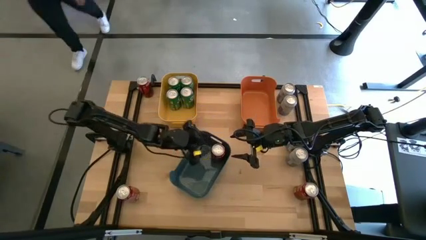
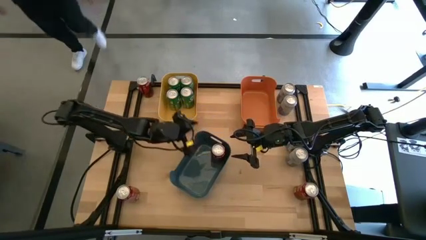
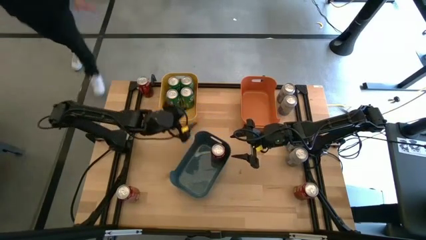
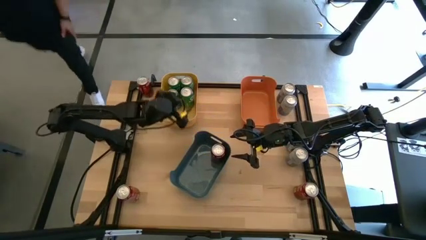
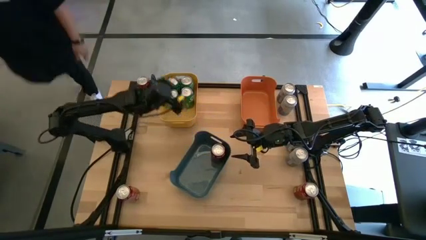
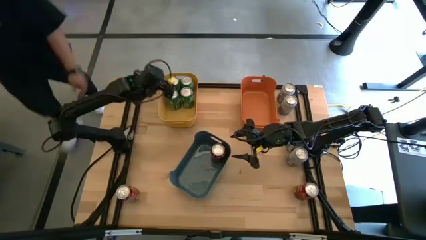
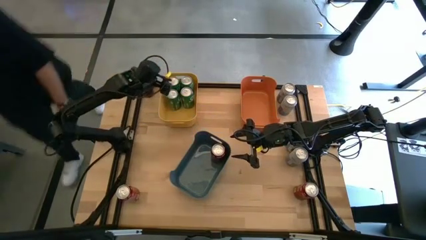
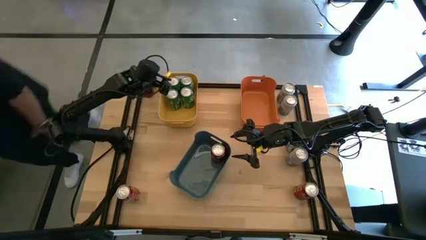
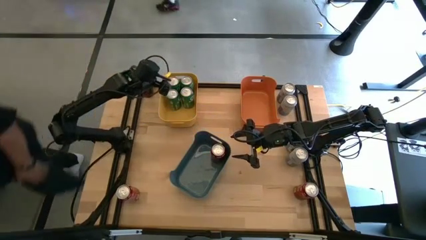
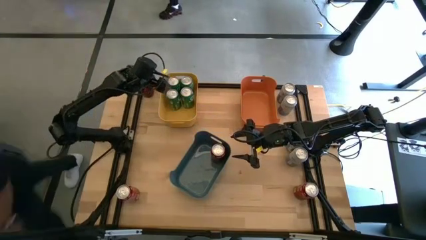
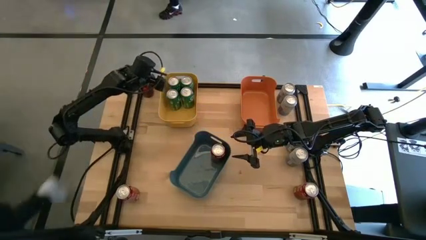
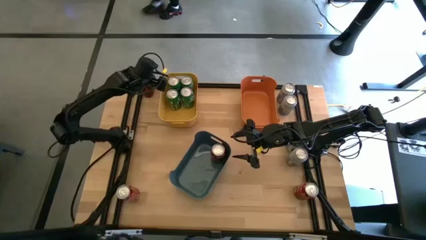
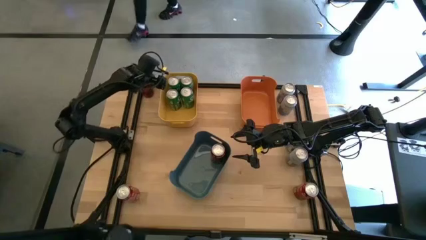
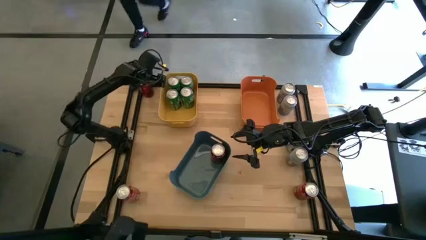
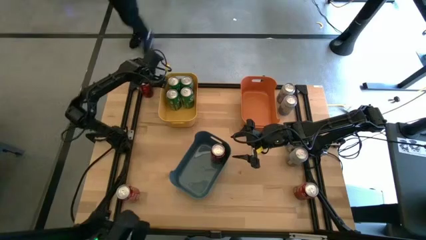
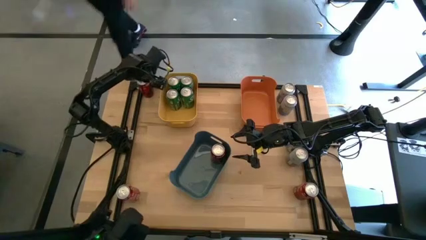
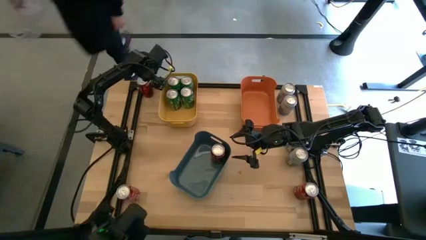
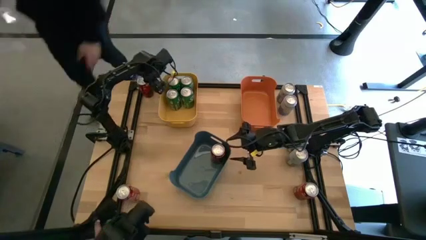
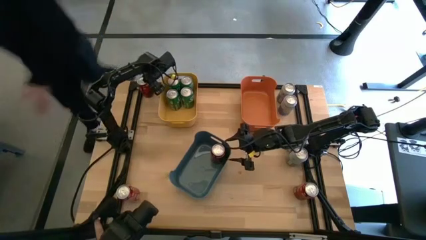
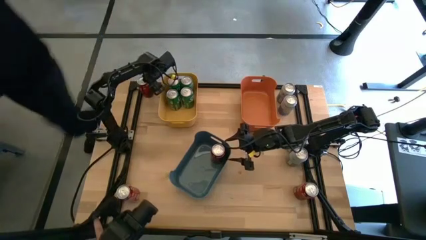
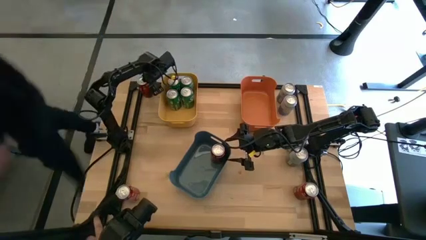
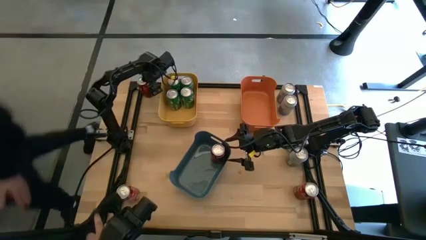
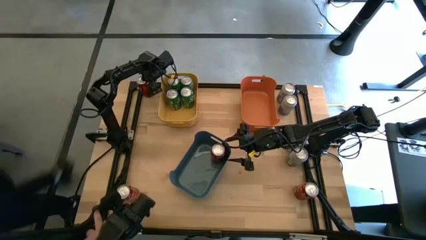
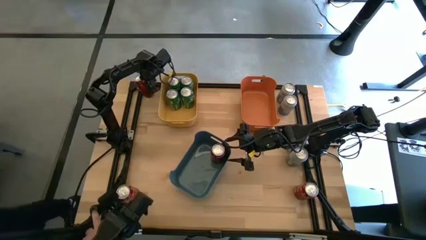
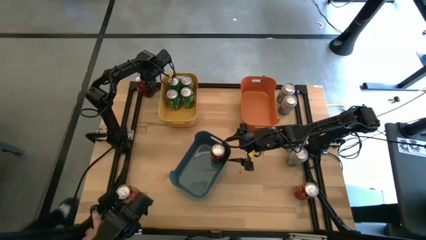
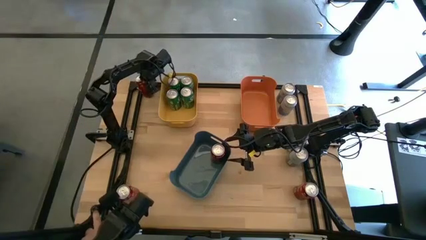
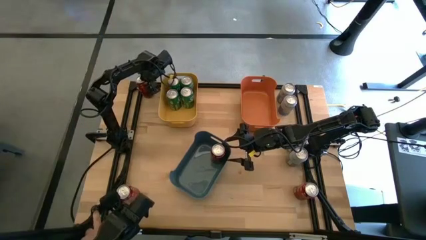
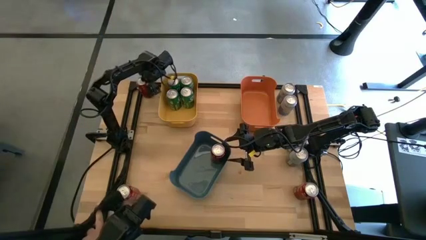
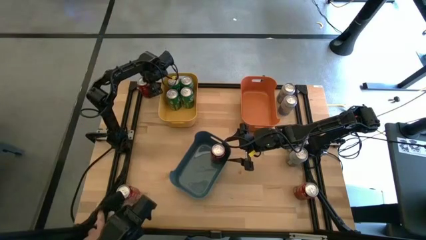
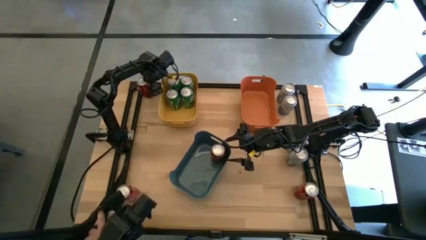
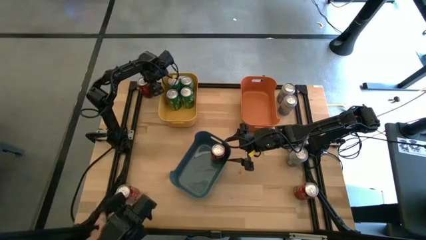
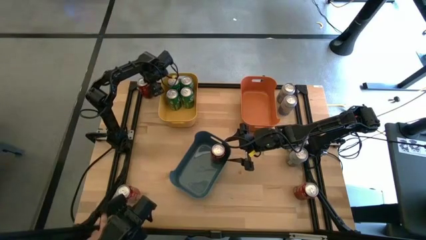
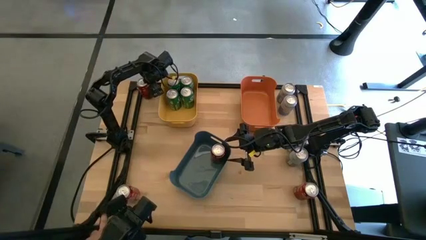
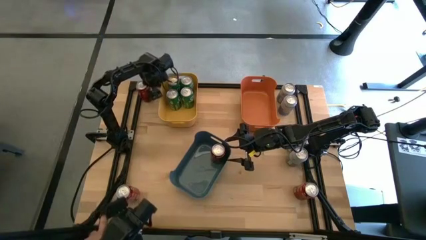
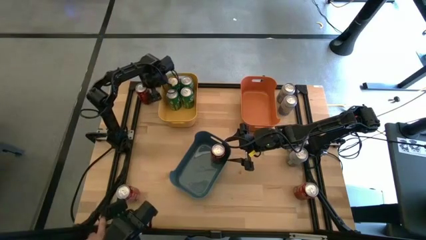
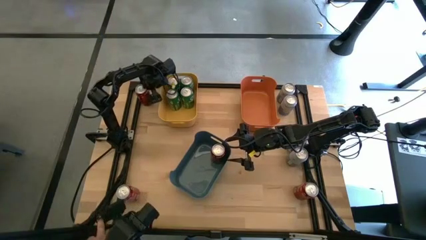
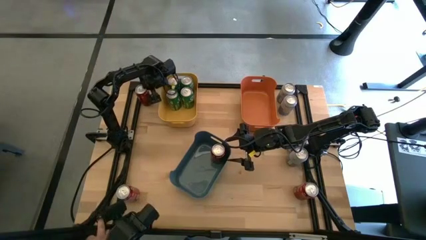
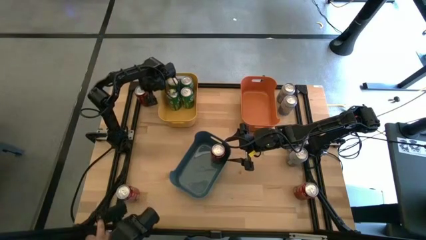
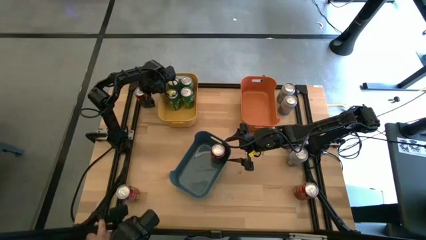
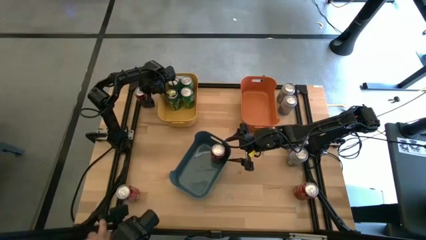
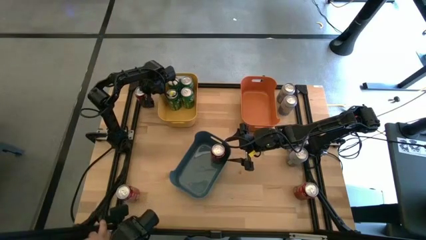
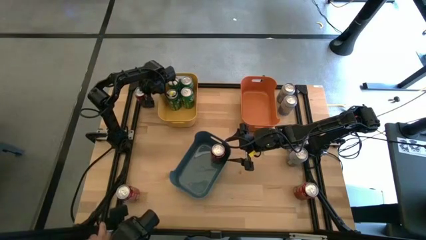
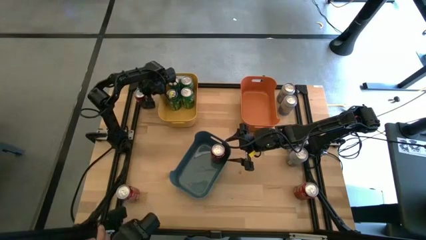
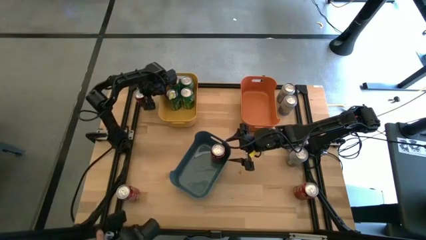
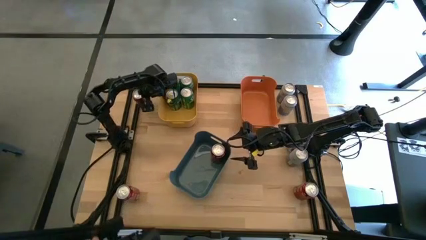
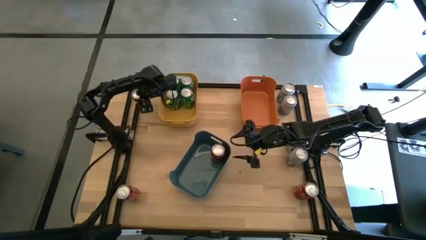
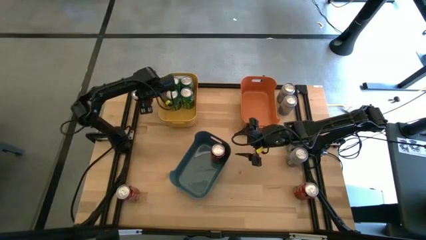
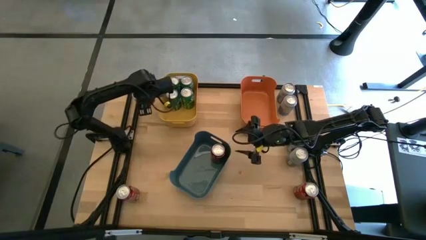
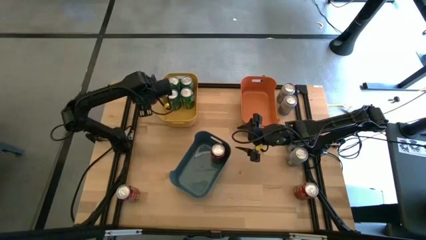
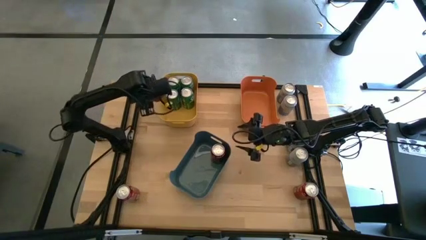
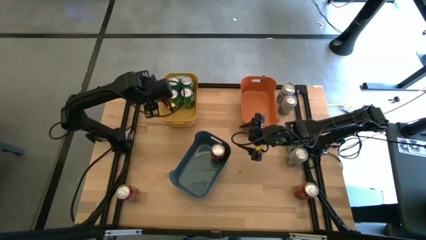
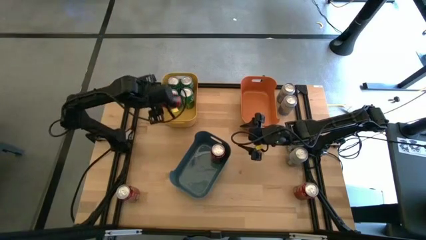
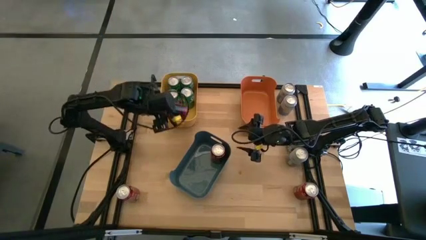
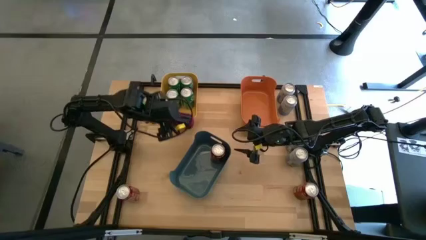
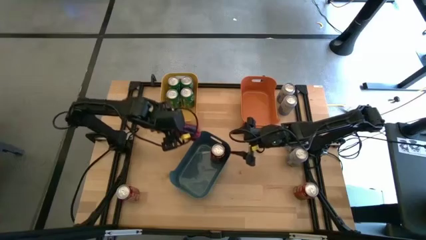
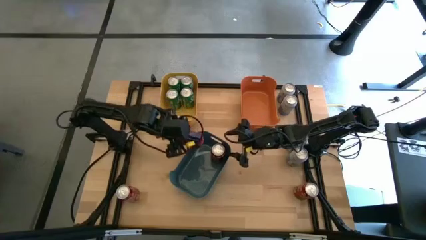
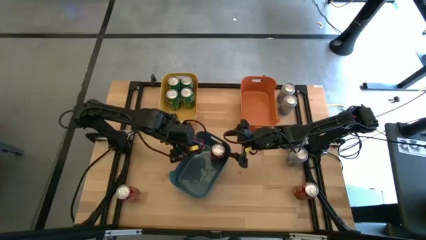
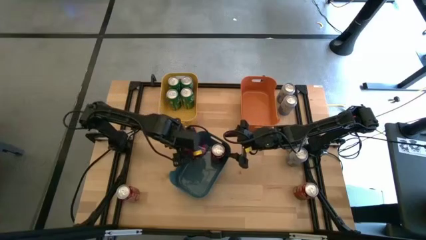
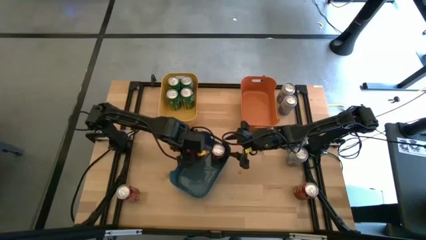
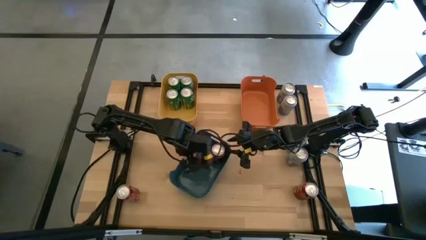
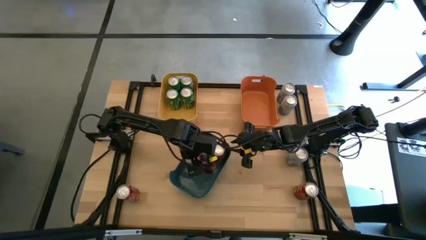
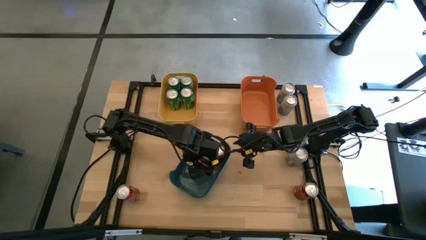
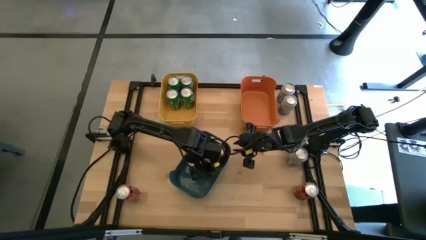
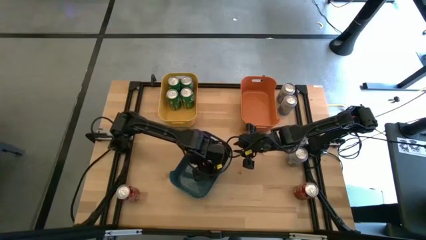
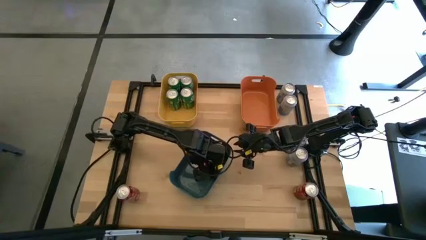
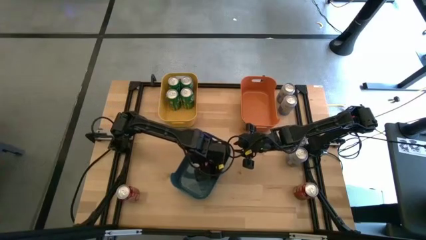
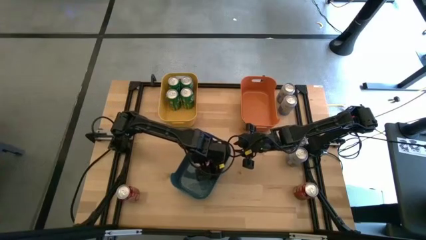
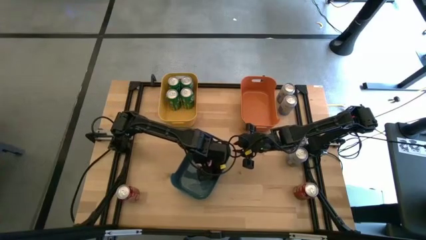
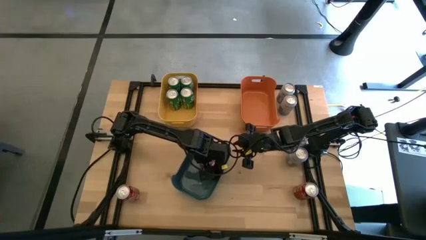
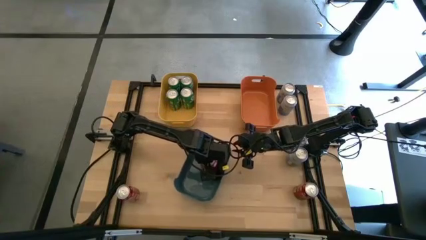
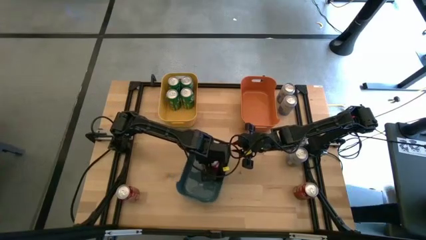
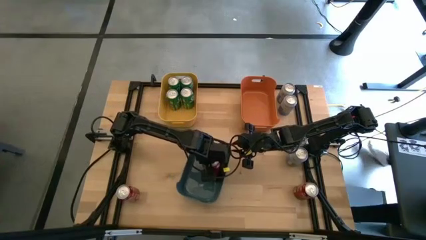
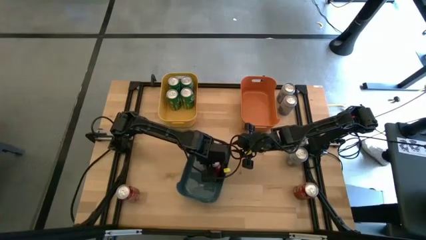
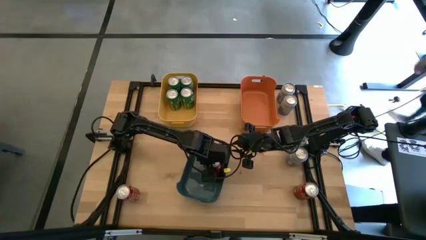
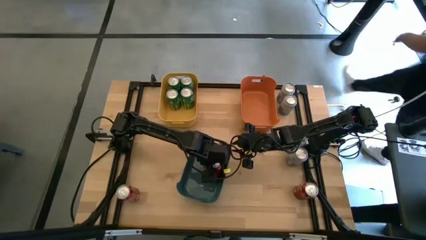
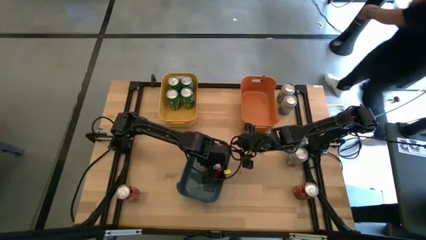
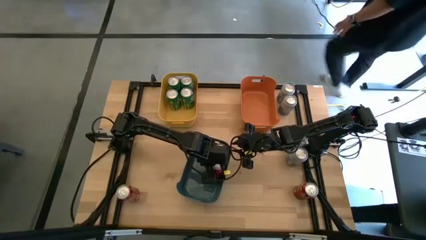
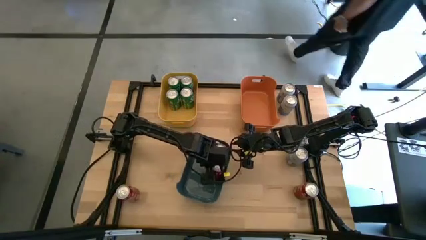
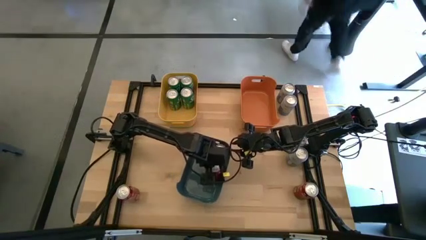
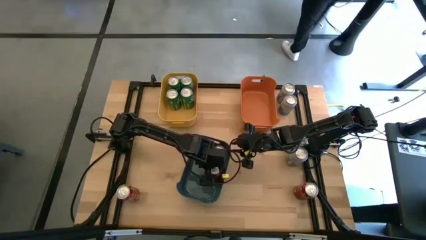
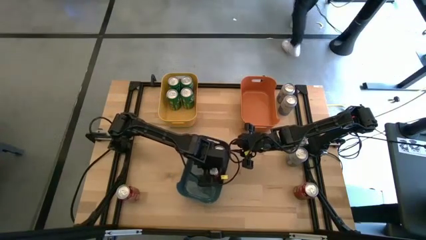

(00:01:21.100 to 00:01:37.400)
Task: Sort soda cans
Put the red soda can into the blue bin
